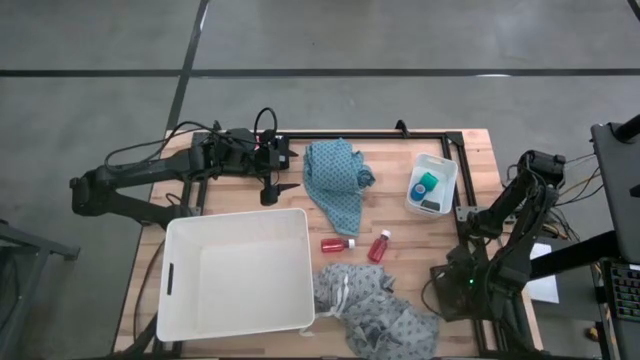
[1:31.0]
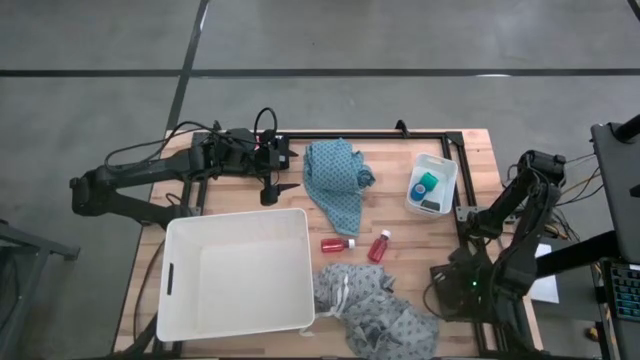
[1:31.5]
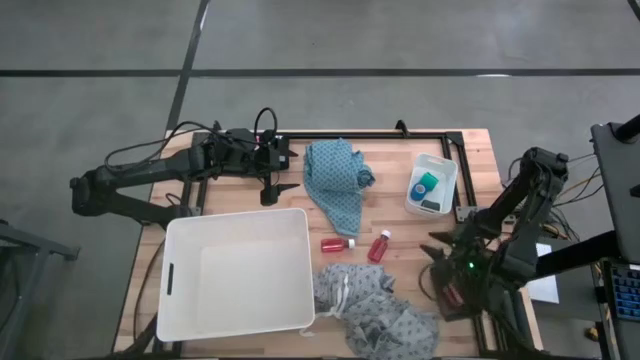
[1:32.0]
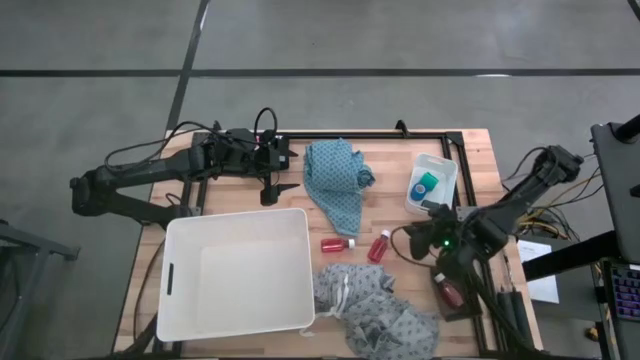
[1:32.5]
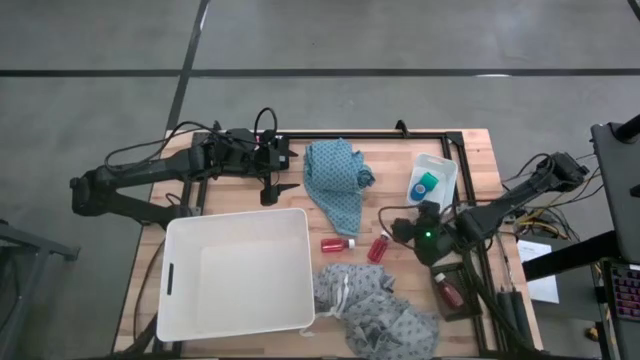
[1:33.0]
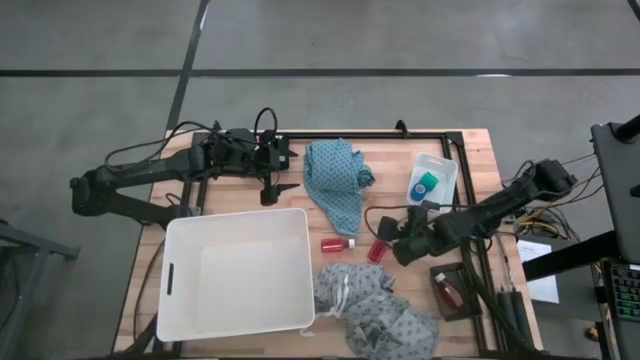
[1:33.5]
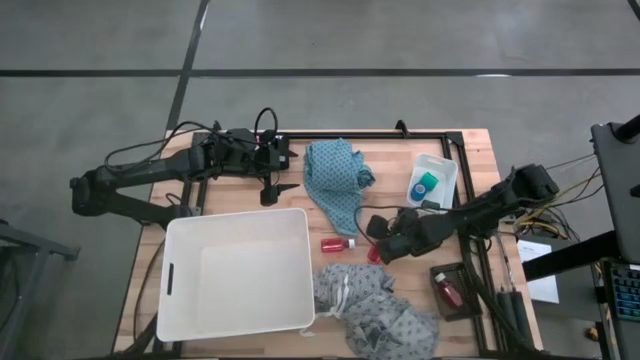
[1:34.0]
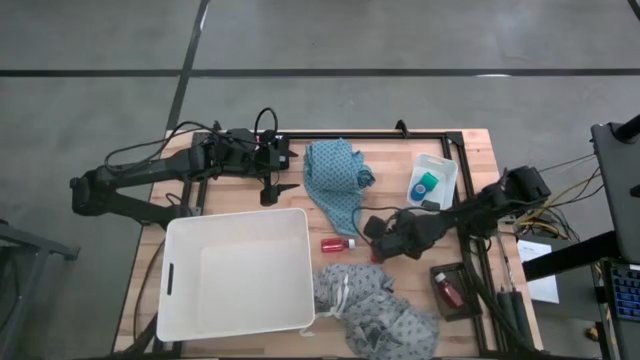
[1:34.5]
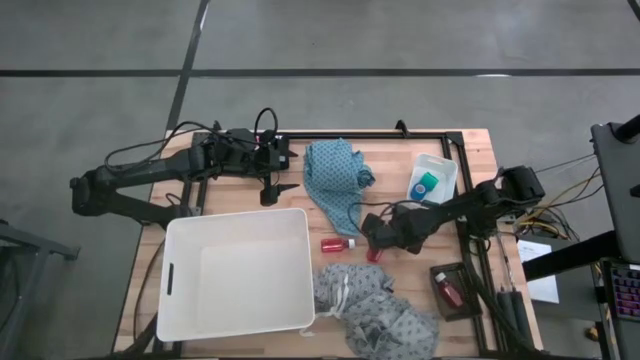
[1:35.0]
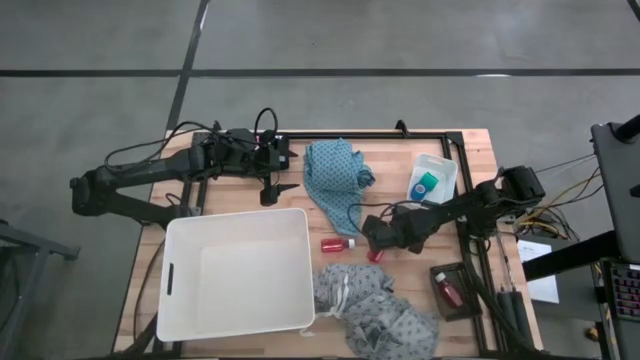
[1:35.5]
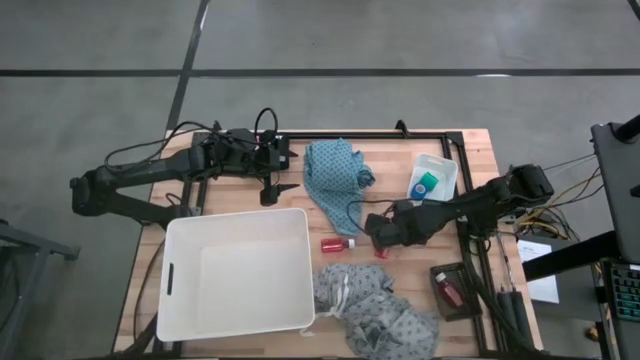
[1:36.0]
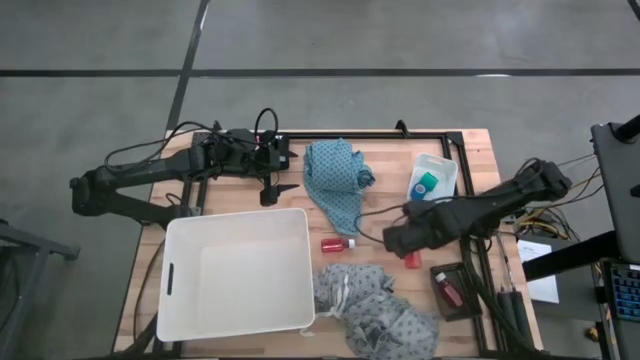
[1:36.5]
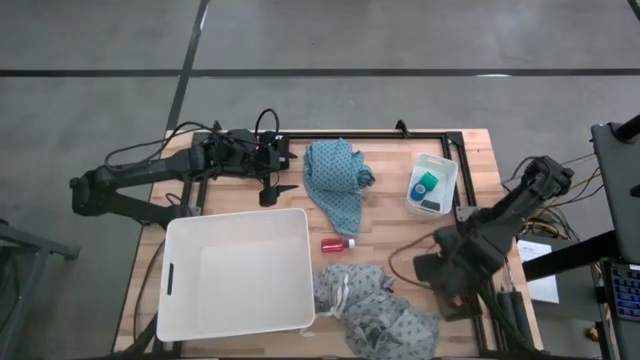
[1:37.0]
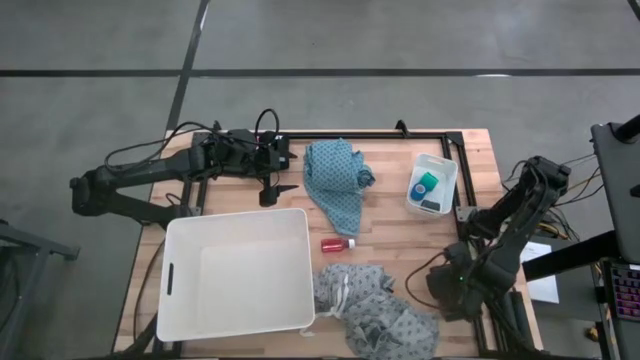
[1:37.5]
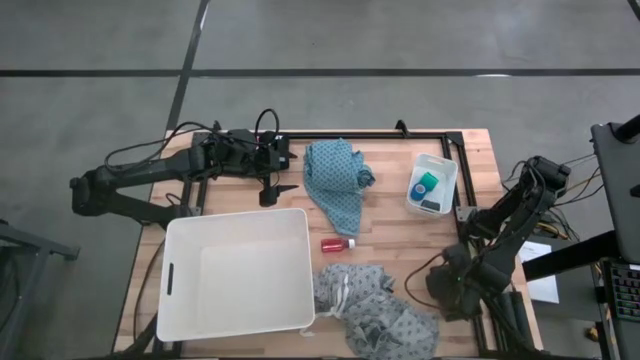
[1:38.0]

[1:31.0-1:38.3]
Task: Pick & Place Medicine items
Put the right red medicine bottle into the black bin

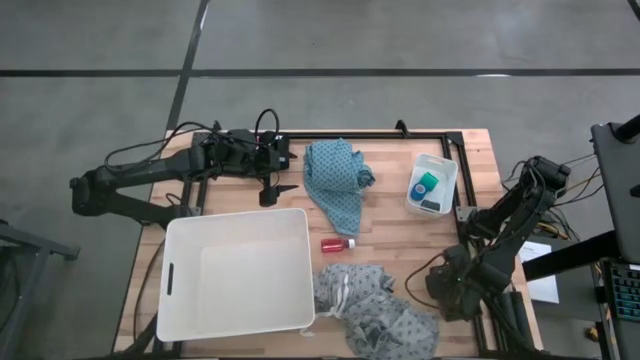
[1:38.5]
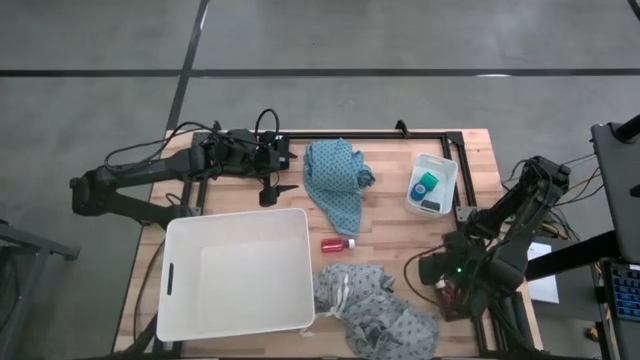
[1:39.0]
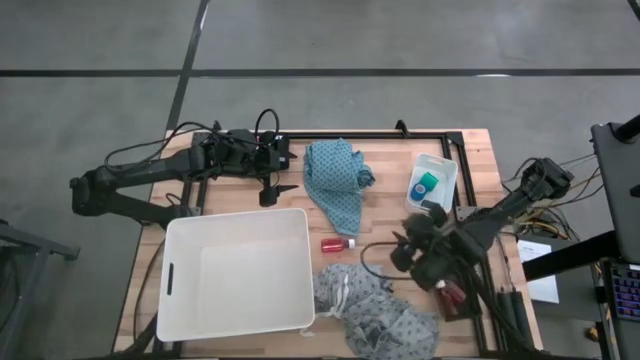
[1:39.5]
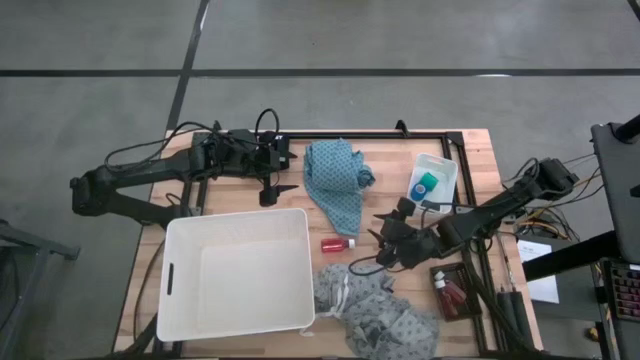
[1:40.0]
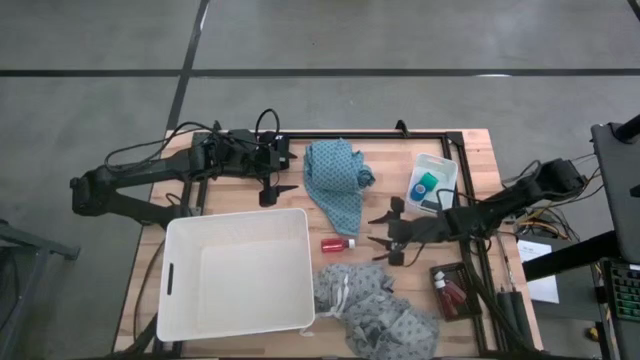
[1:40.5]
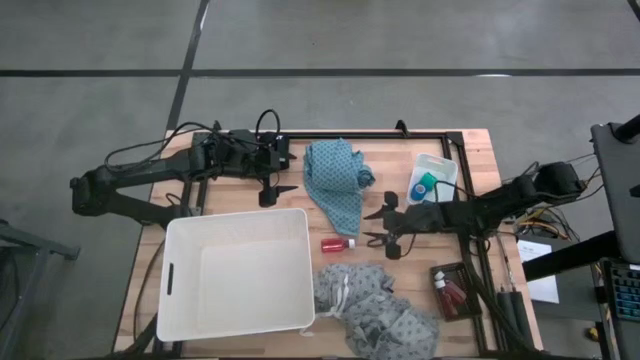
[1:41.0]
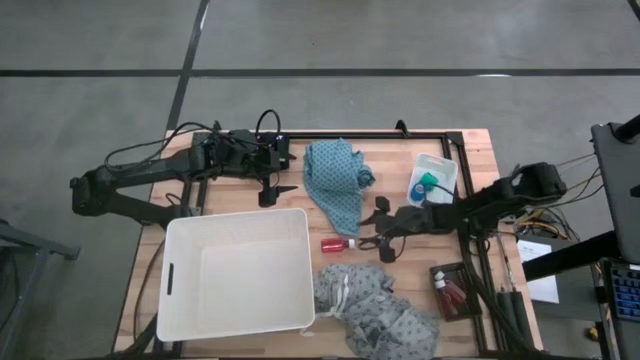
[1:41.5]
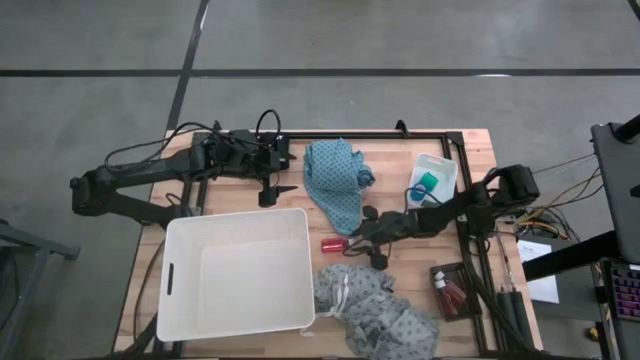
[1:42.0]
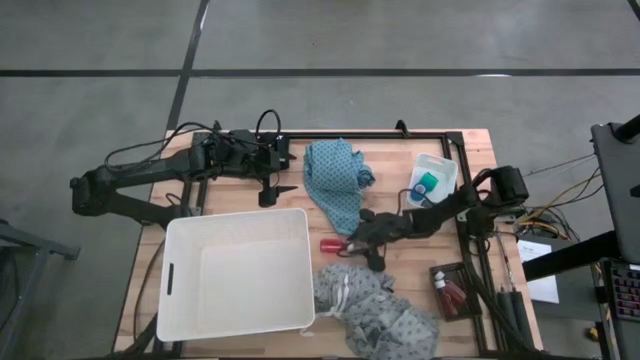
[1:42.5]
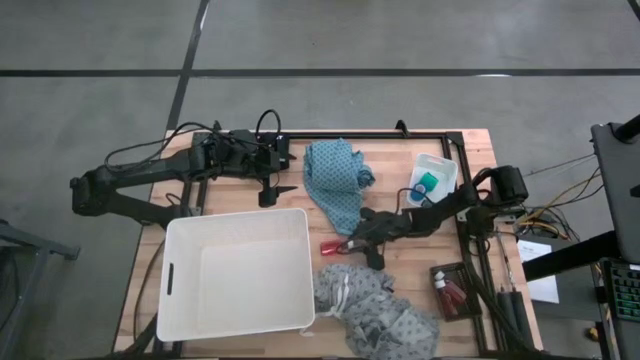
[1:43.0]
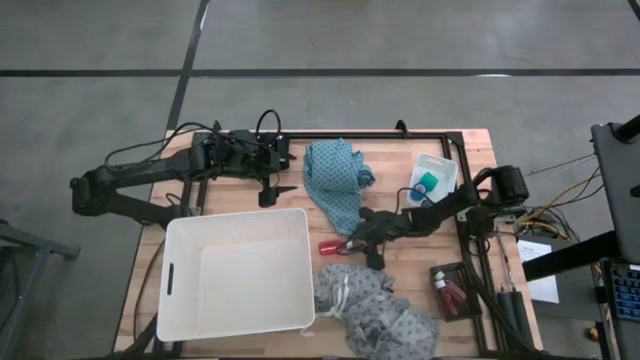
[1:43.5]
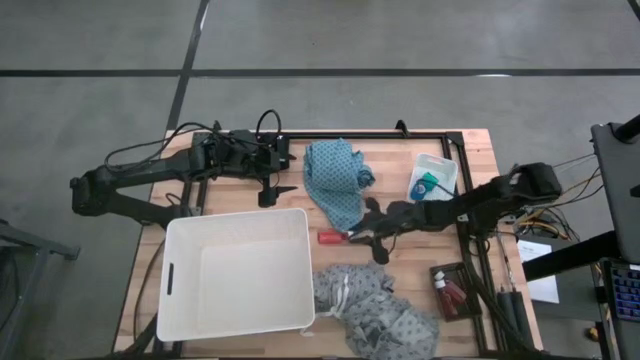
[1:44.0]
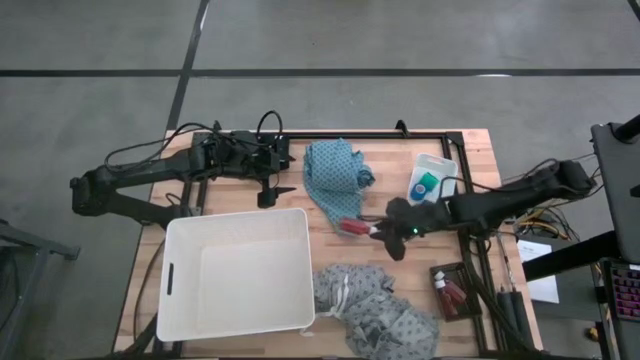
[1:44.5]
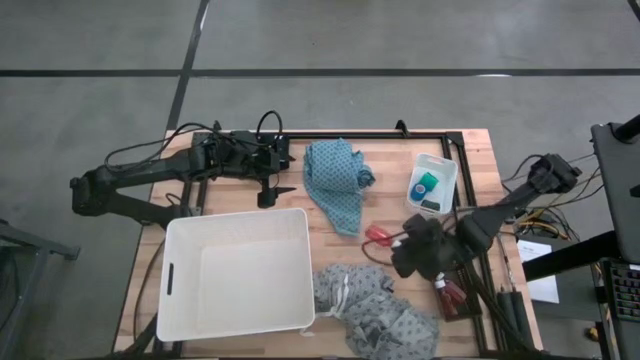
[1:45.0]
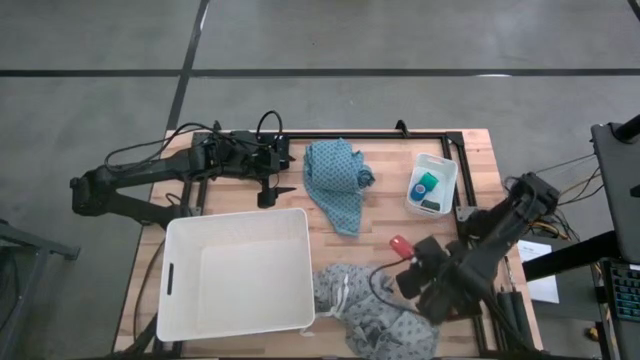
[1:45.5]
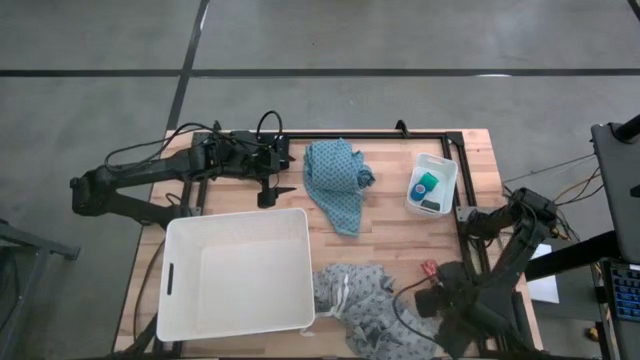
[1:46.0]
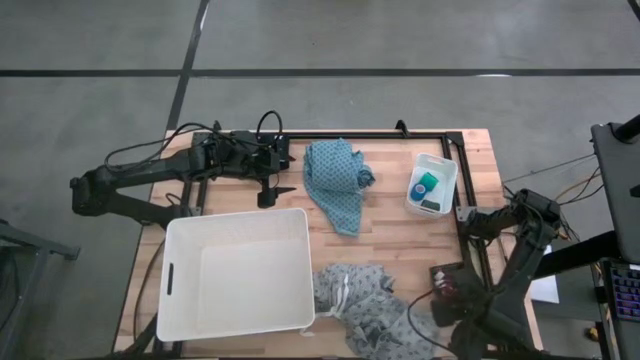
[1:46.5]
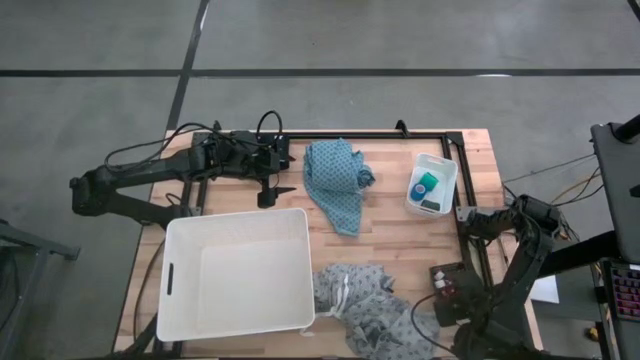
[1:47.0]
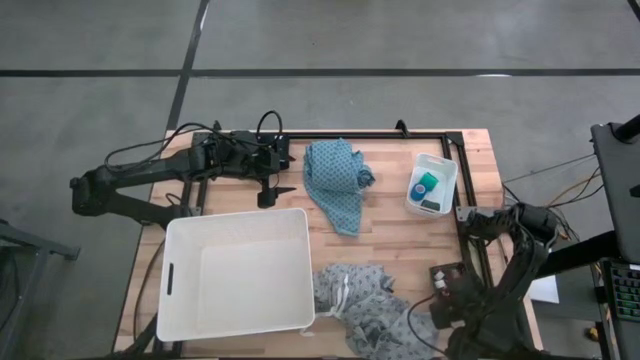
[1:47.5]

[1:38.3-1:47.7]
Put the red medicine bottle into the black bin

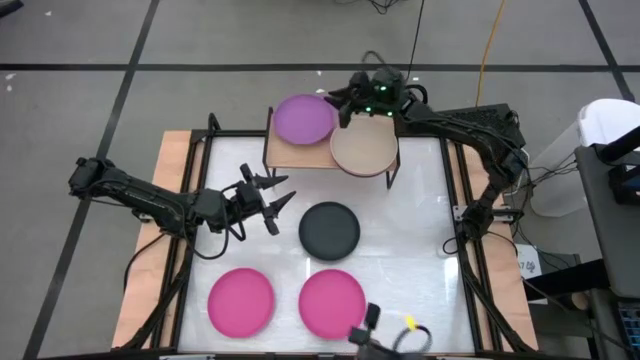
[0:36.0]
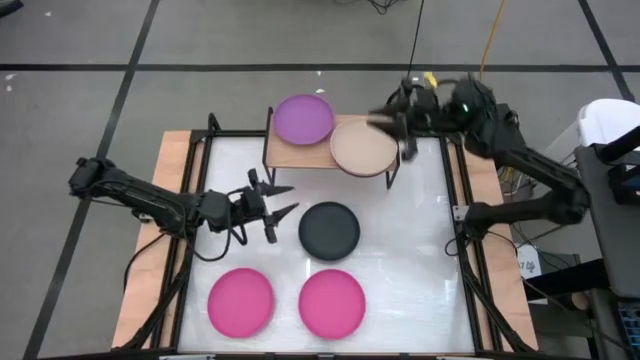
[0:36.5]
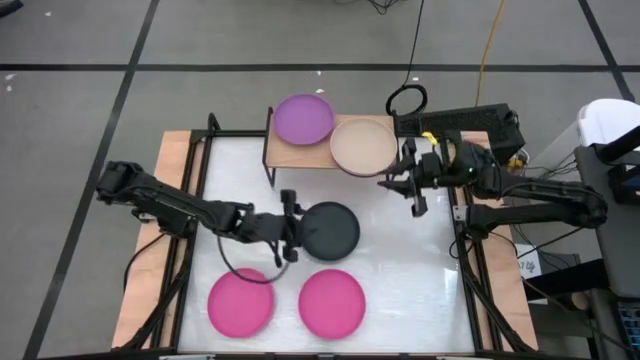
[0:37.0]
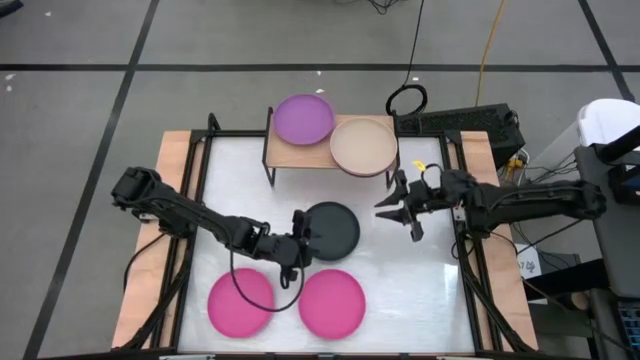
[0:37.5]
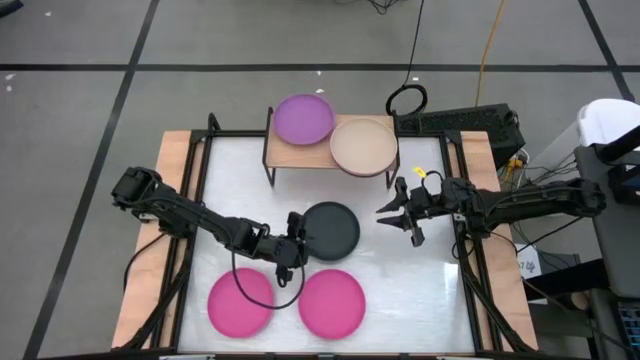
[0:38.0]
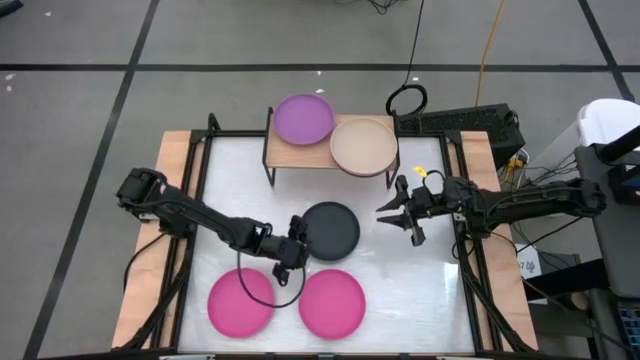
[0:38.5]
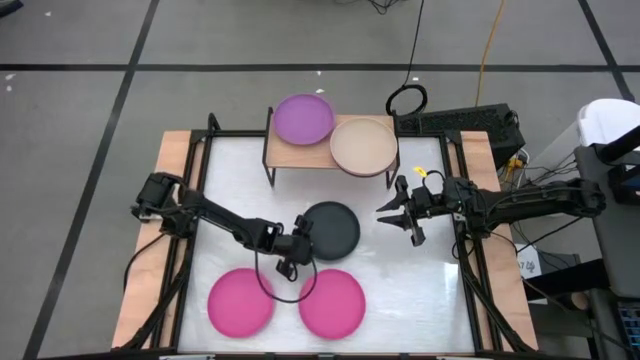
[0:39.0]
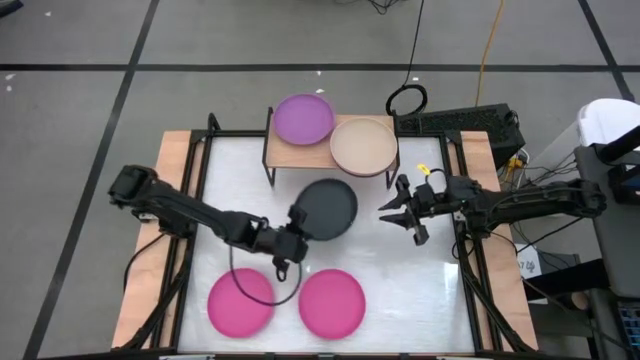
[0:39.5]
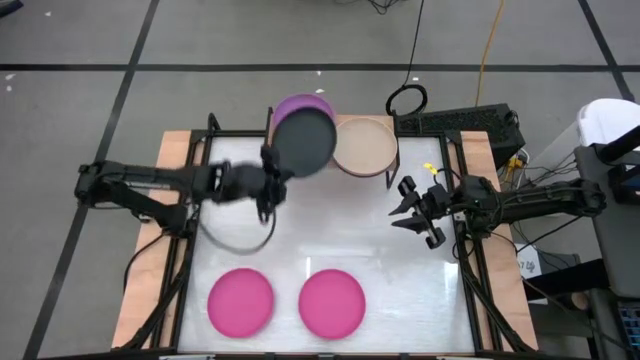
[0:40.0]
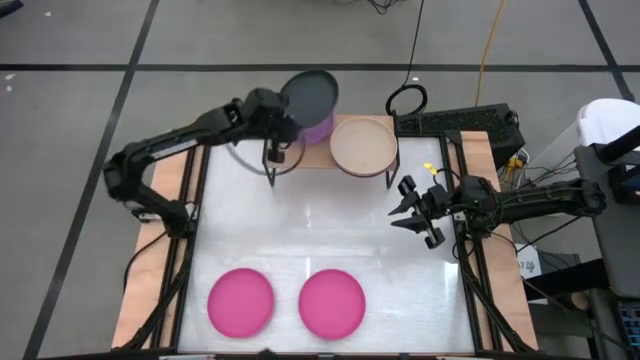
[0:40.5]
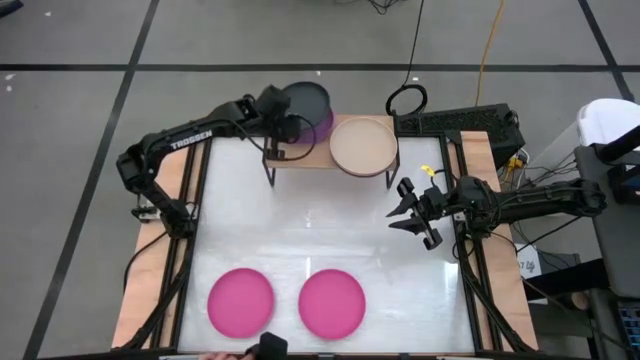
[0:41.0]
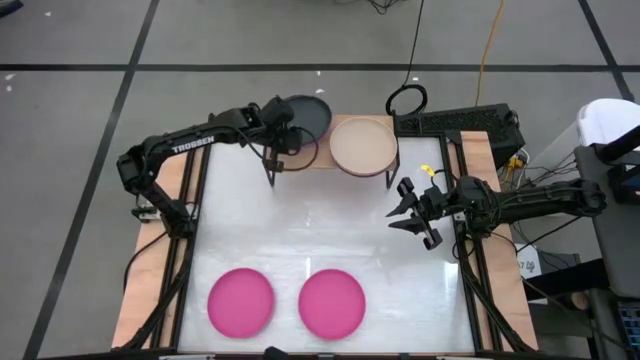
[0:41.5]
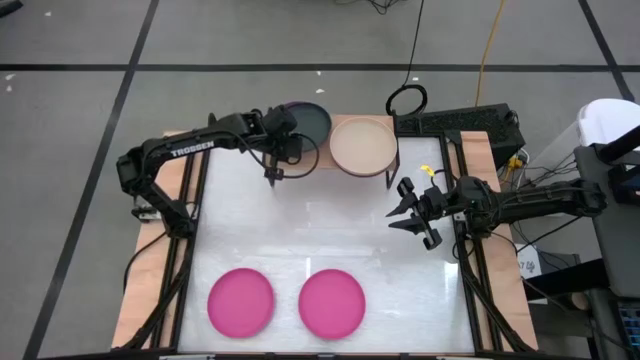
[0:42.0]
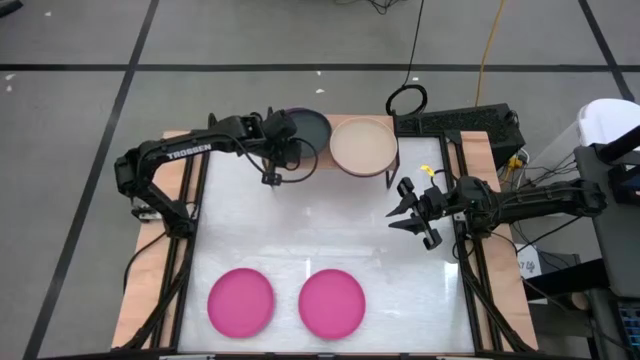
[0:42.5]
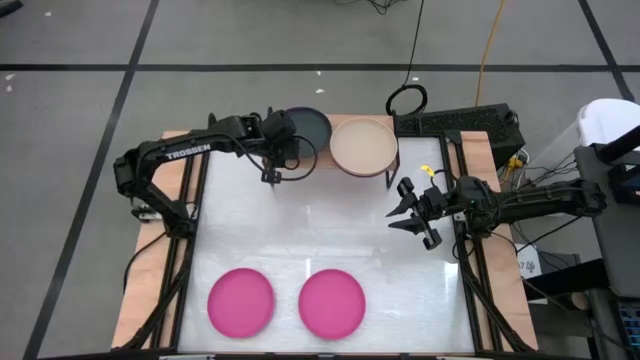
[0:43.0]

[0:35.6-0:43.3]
Task: Place and stack plates onto a shelf
Stack black plate on top of the violet plate on the shelf
